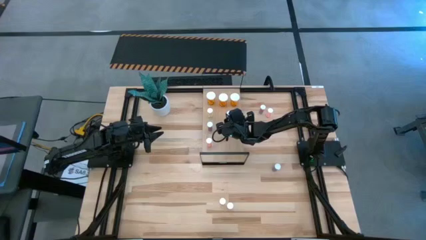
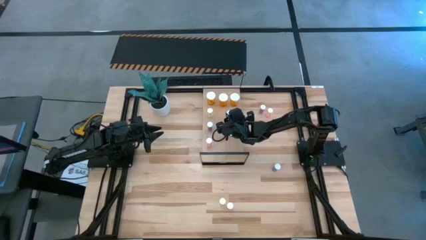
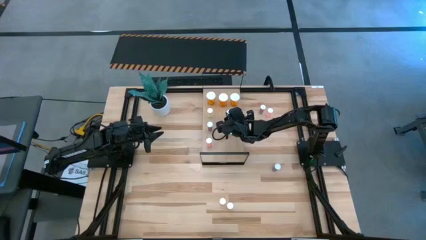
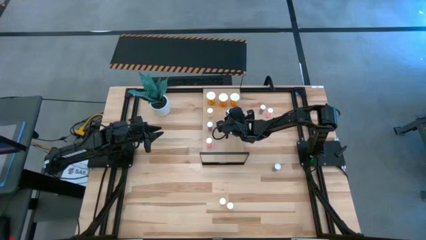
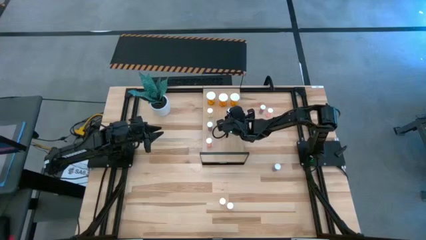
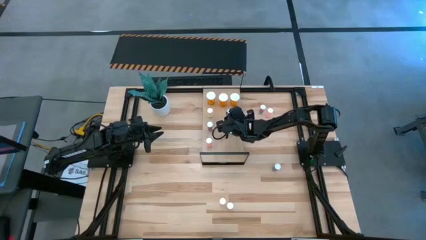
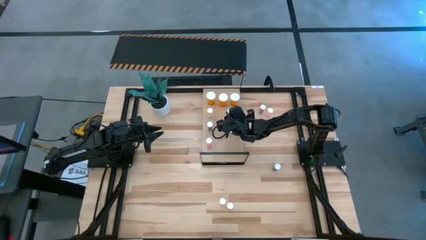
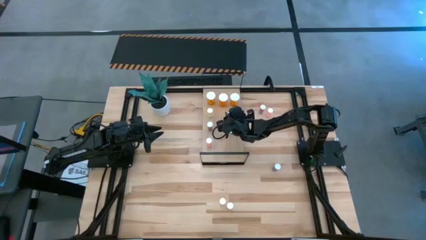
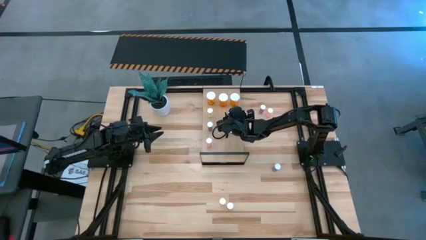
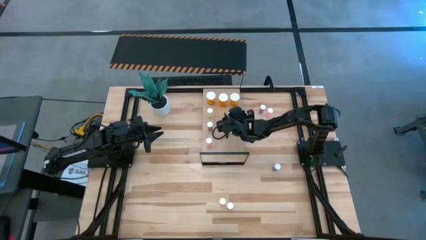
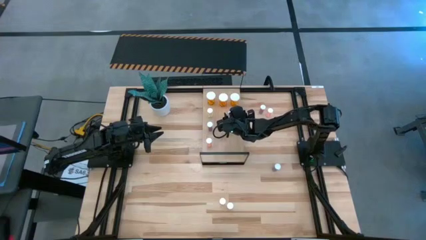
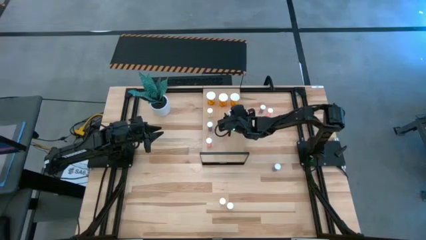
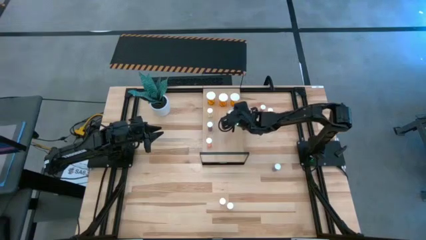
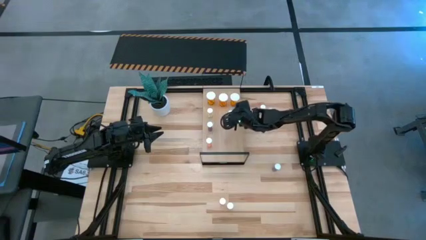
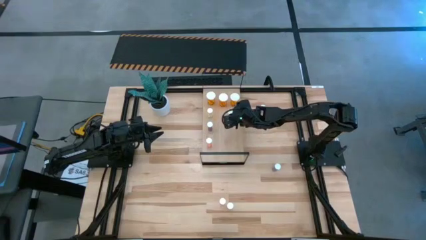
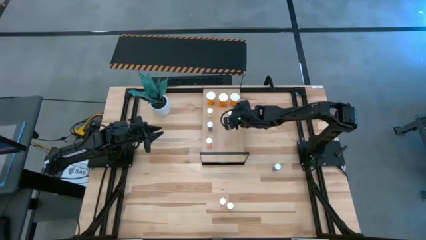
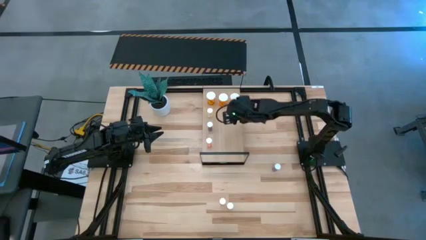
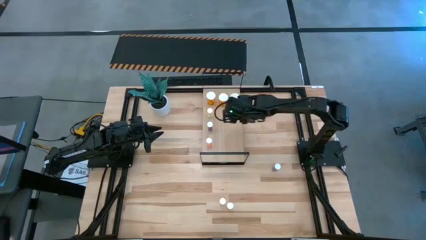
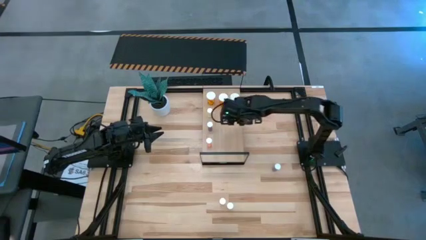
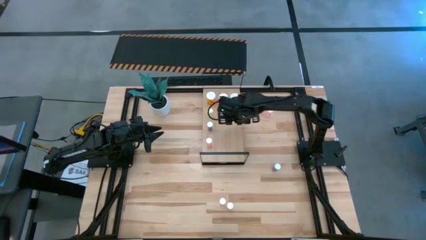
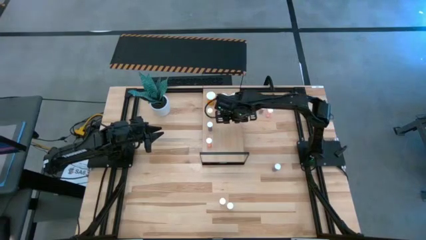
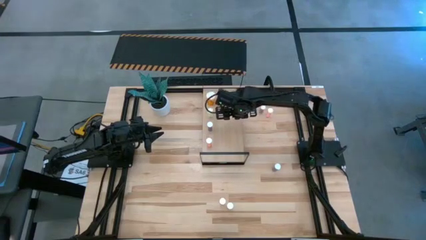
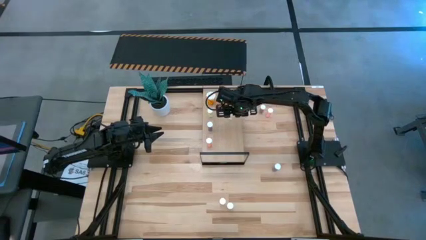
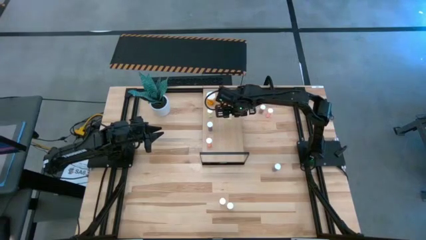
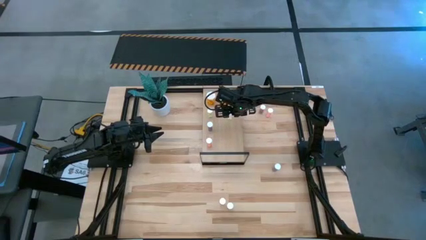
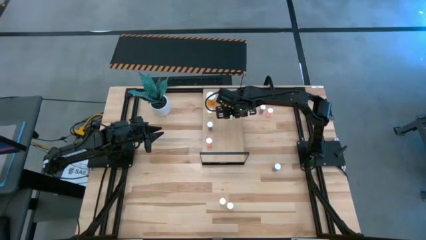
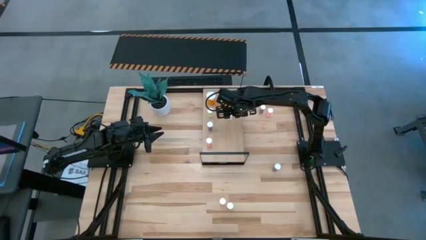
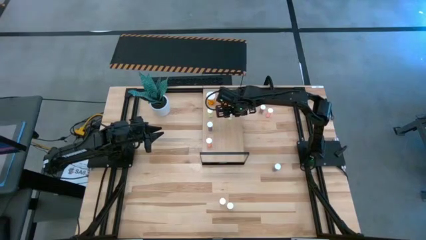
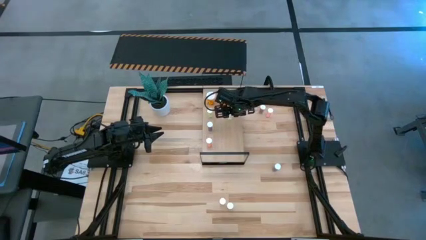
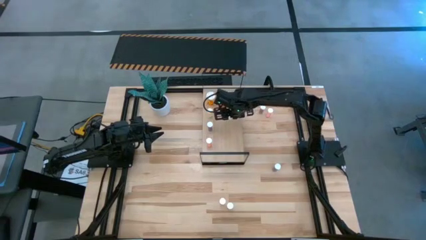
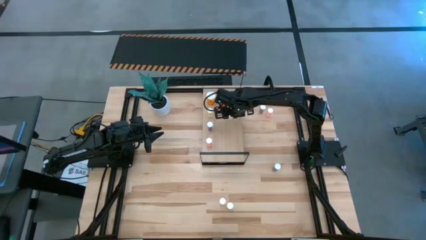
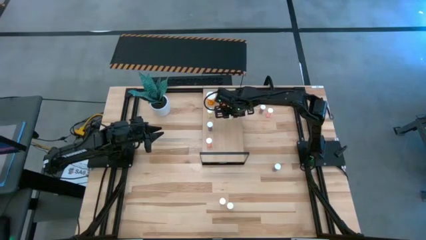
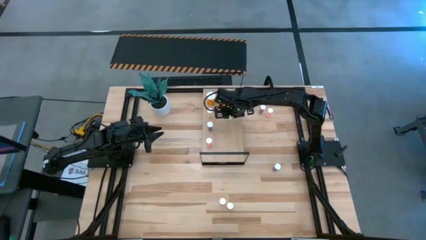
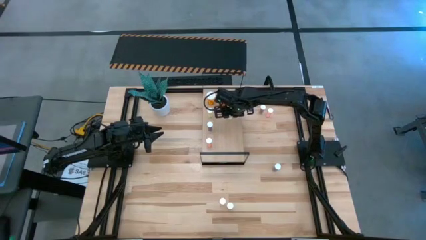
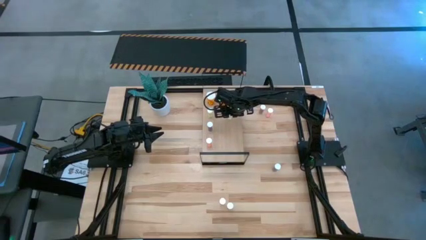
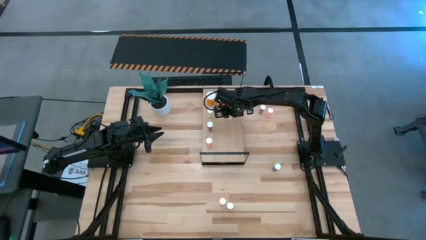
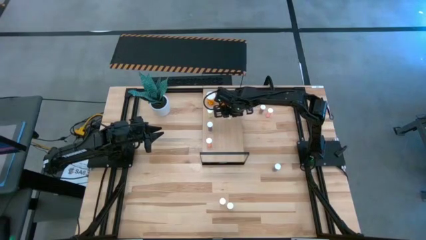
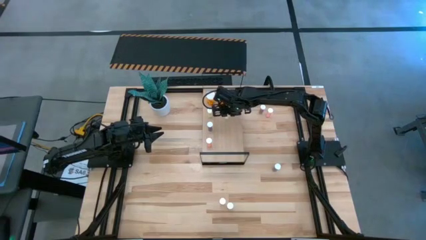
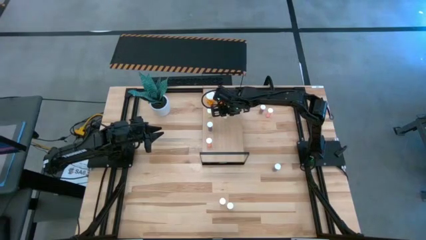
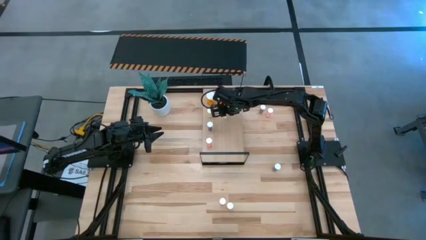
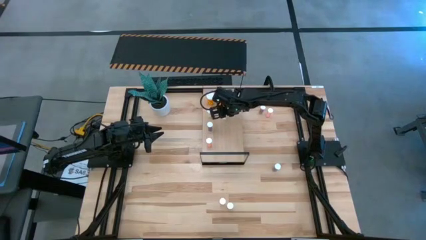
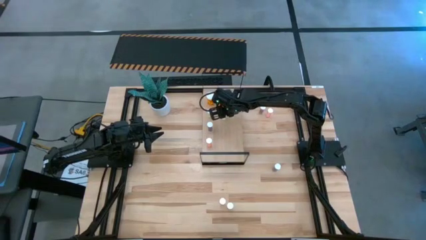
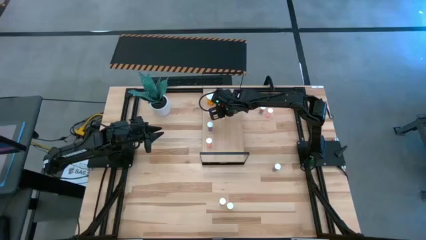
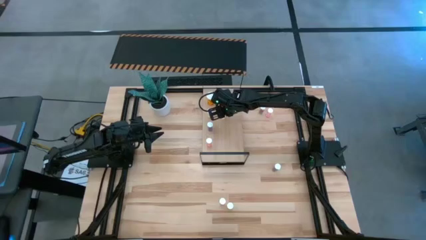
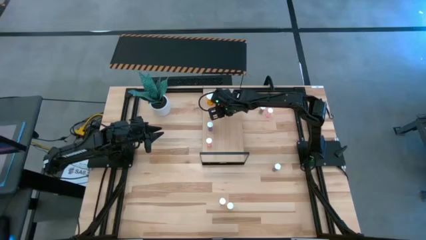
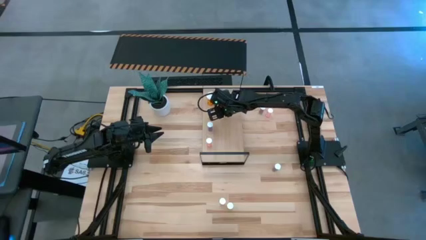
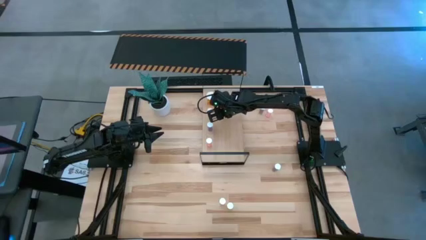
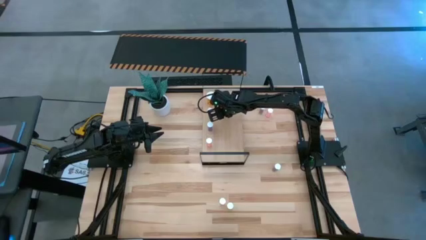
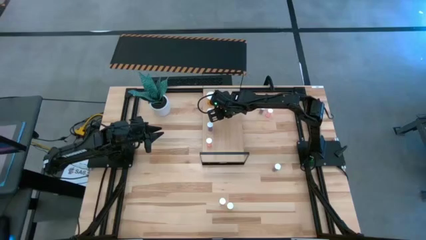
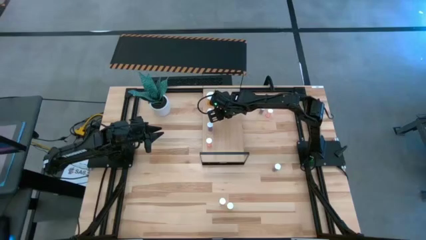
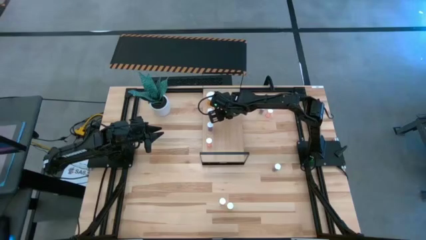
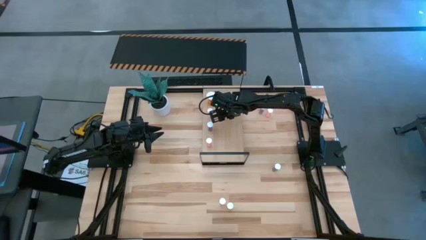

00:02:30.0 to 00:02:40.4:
Task: Pick and place medicine bottles onto shelf by color
Put the top small yellow pill bottle on the shelf aligned with the other small yellow pill bottle

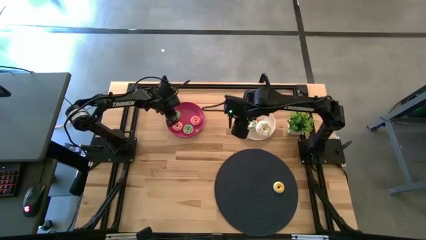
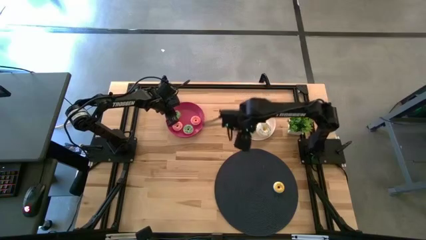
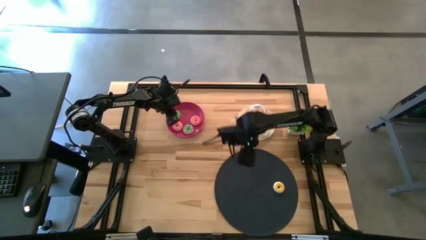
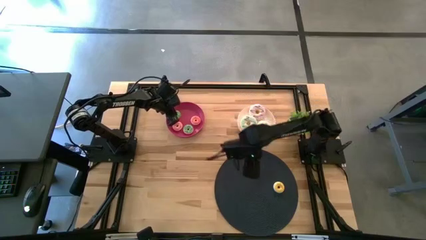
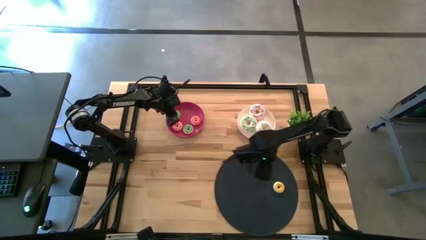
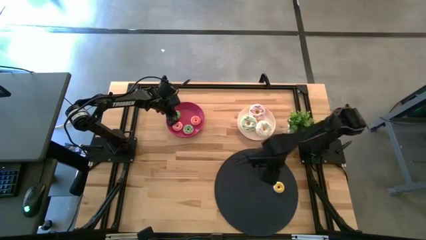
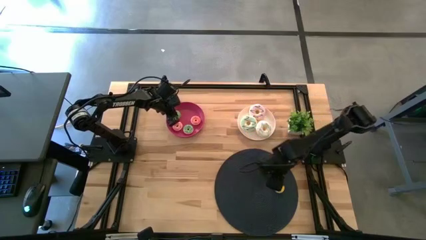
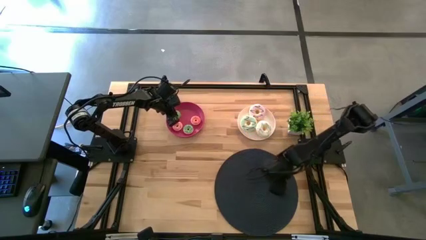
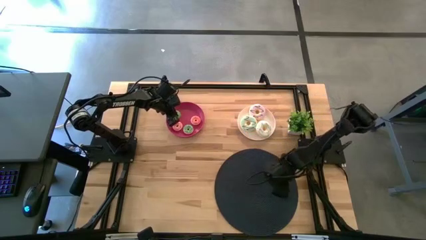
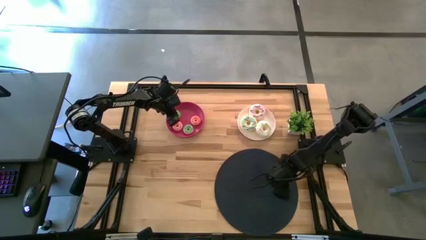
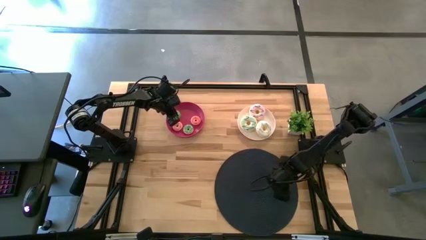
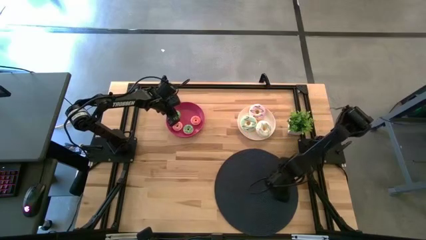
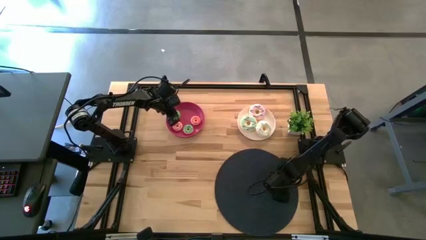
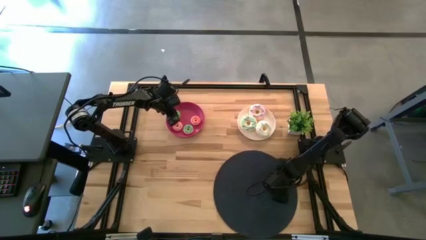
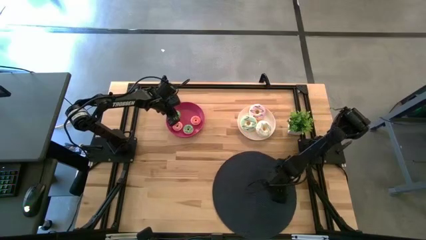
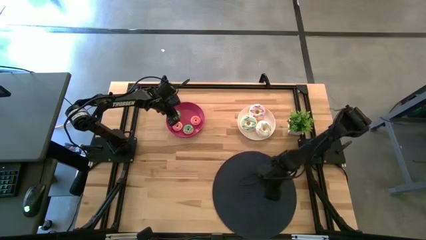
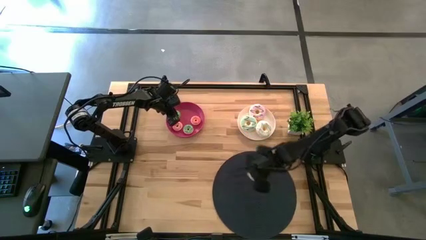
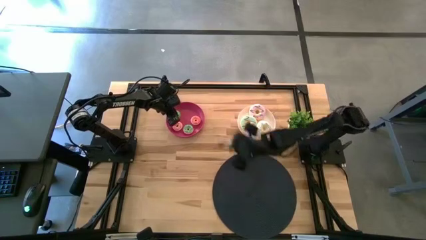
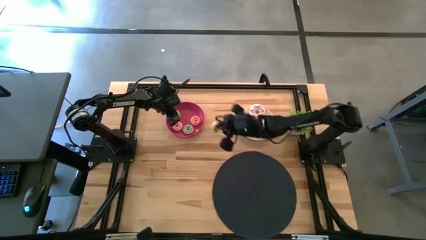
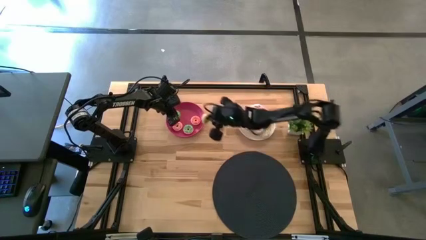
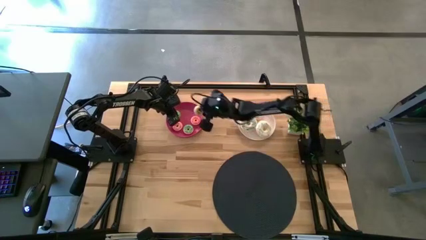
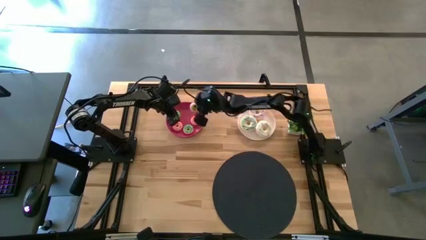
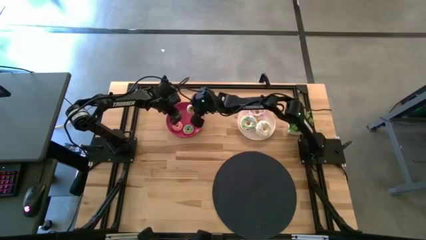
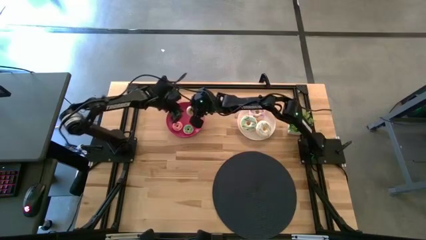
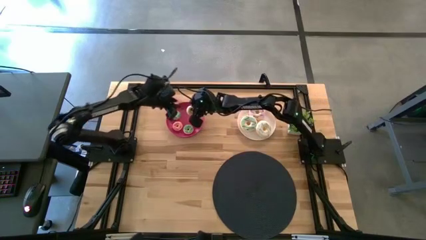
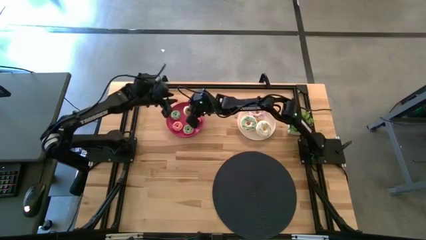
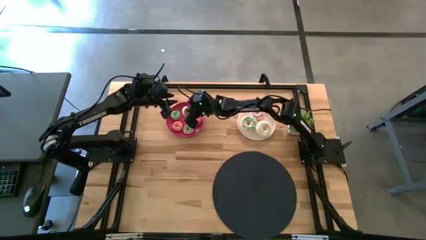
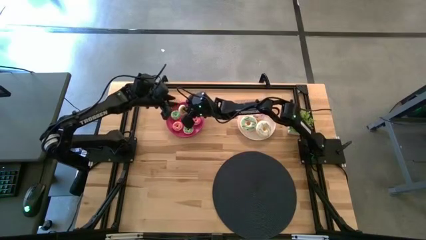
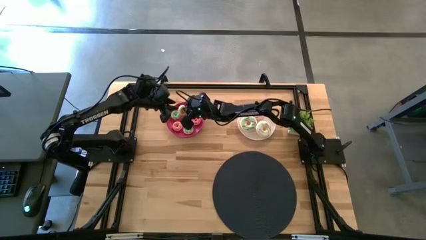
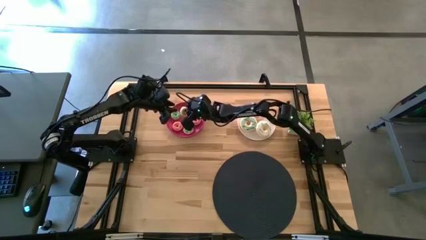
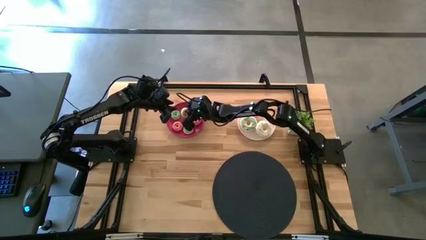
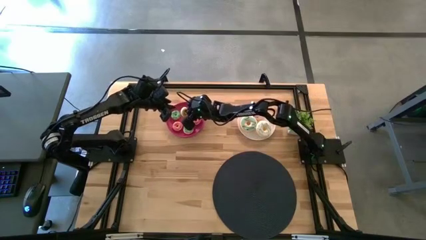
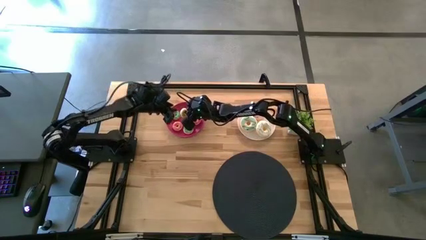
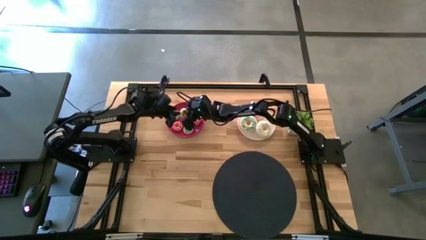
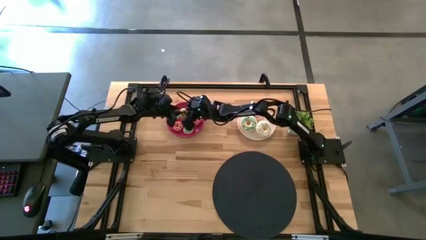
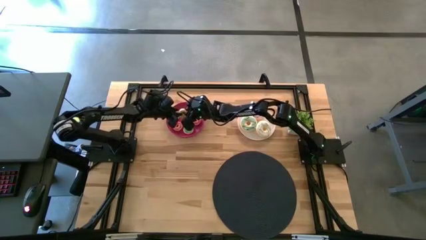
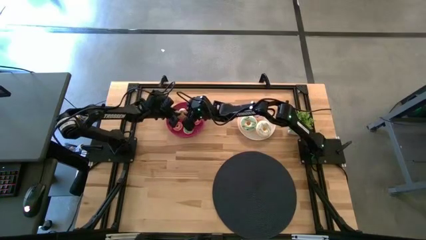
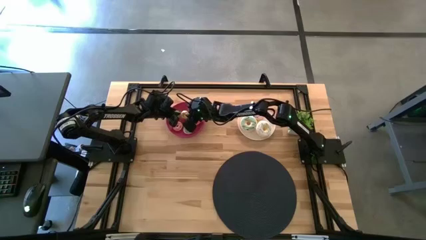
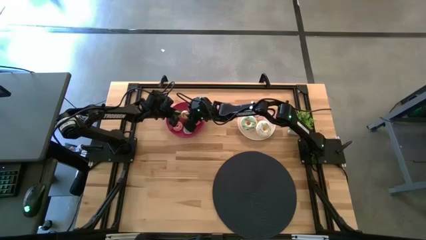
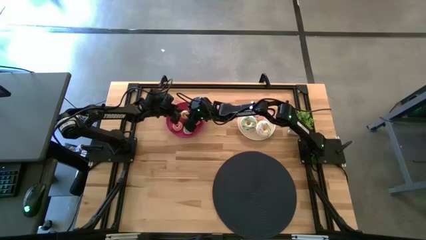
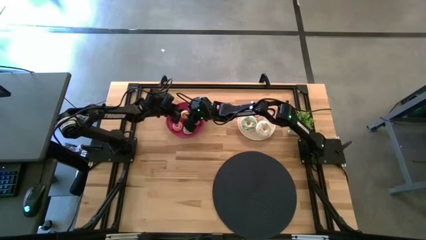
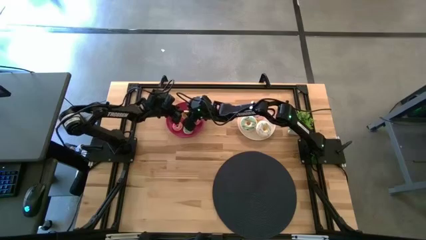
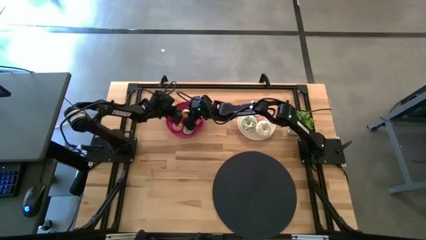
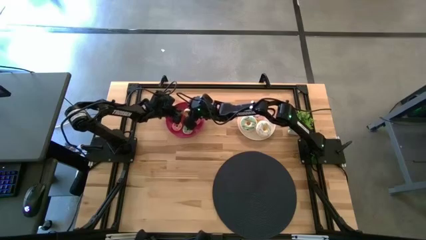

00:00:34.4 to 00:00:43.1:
Task: Pick & Place donuts
Put the small yellow donut on the pink plate
